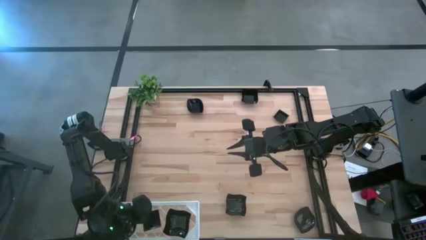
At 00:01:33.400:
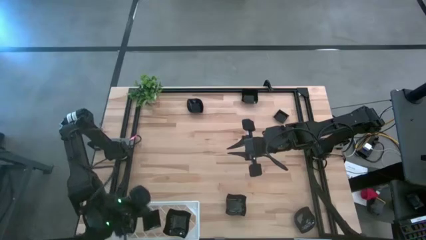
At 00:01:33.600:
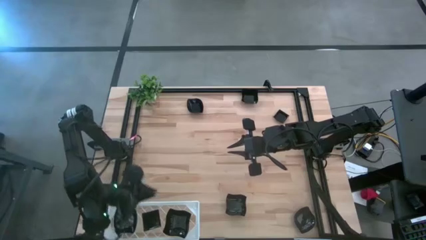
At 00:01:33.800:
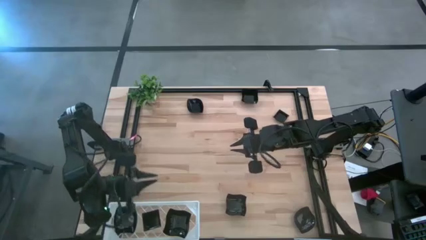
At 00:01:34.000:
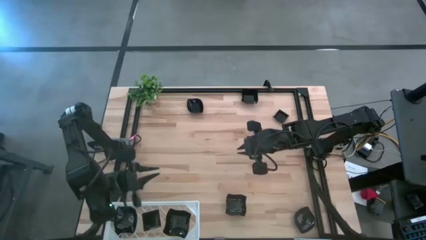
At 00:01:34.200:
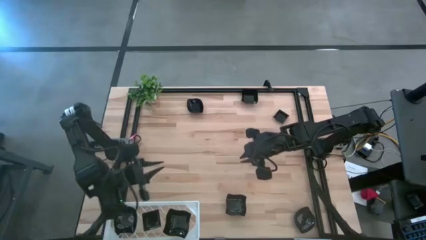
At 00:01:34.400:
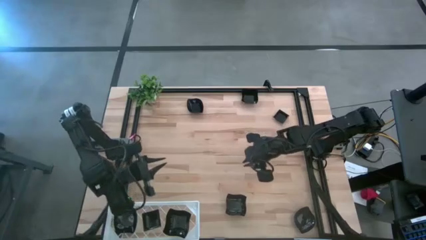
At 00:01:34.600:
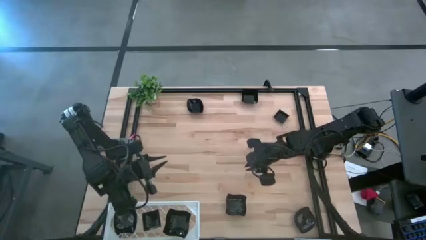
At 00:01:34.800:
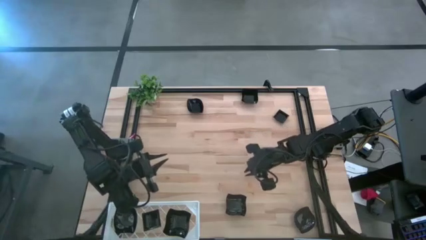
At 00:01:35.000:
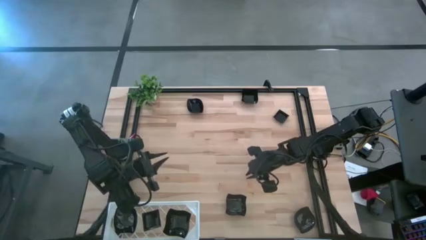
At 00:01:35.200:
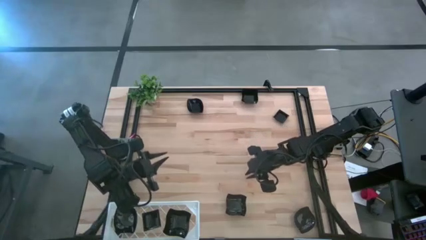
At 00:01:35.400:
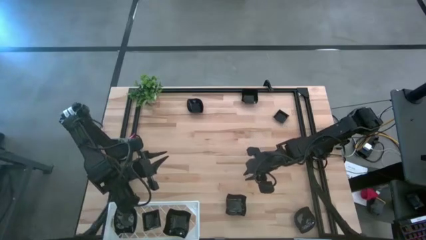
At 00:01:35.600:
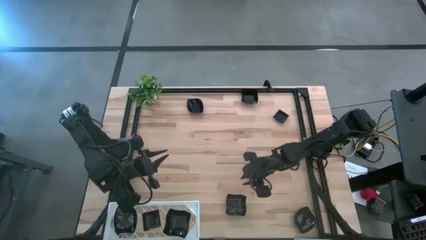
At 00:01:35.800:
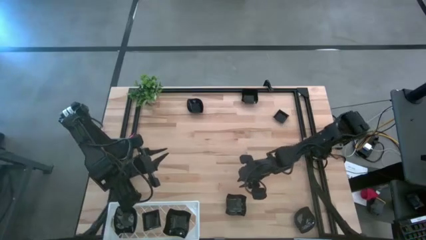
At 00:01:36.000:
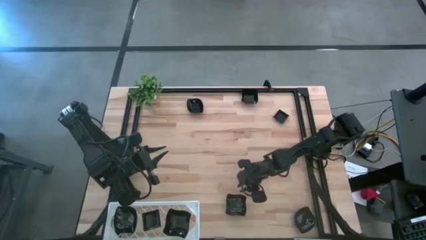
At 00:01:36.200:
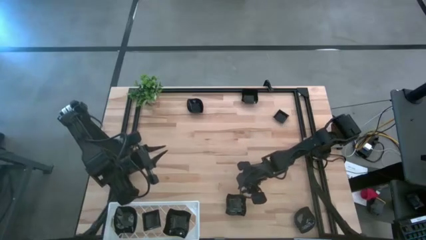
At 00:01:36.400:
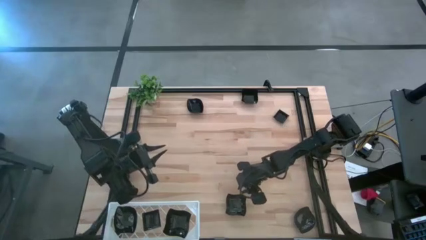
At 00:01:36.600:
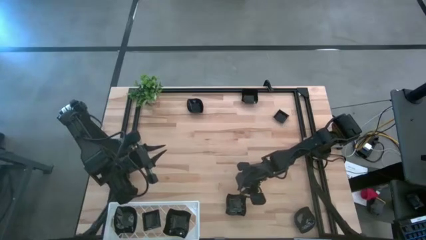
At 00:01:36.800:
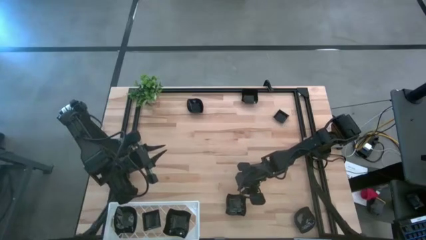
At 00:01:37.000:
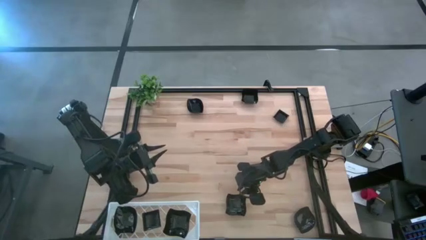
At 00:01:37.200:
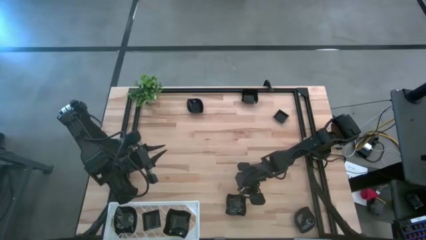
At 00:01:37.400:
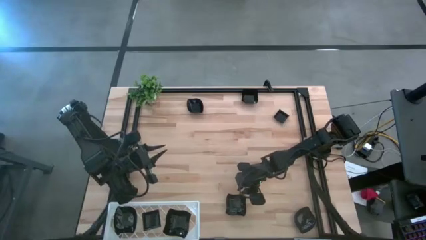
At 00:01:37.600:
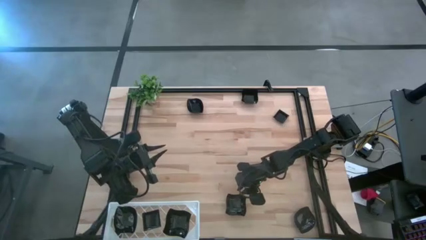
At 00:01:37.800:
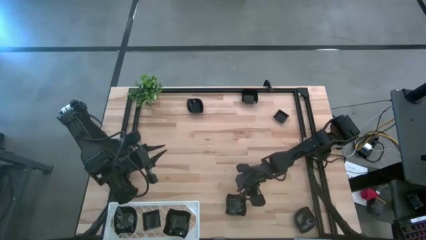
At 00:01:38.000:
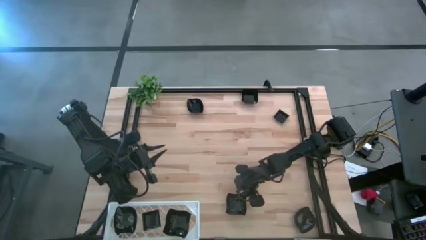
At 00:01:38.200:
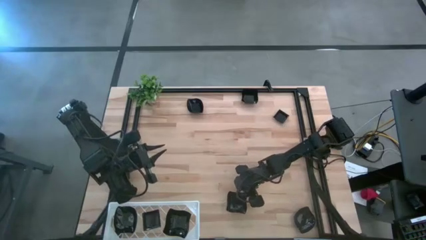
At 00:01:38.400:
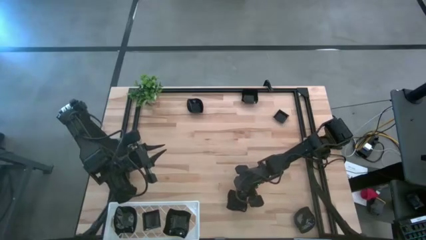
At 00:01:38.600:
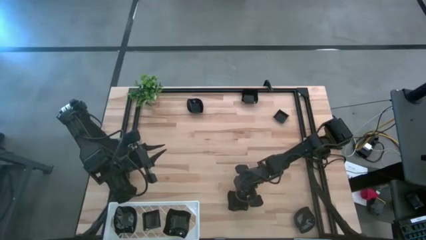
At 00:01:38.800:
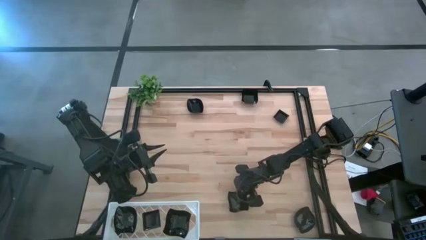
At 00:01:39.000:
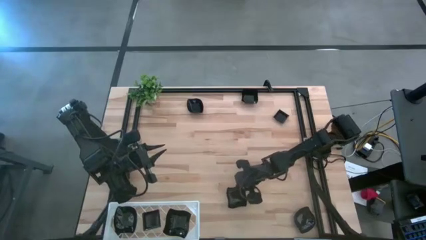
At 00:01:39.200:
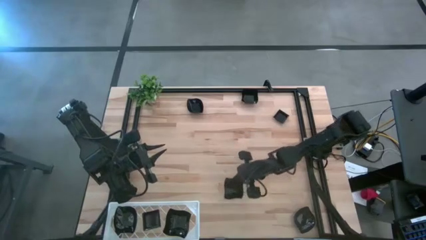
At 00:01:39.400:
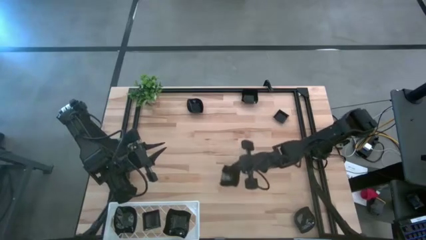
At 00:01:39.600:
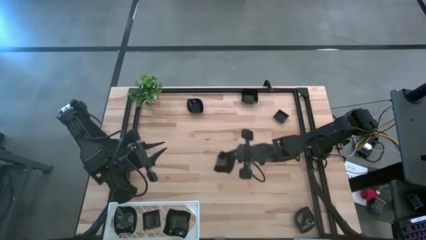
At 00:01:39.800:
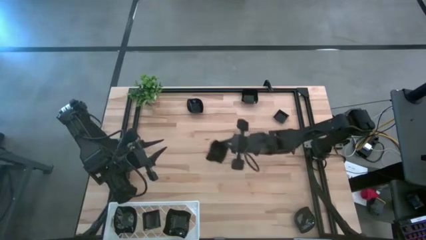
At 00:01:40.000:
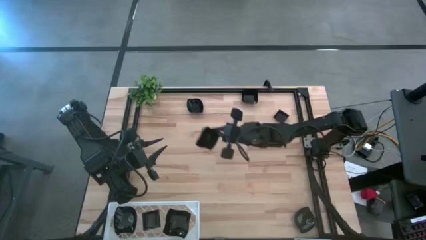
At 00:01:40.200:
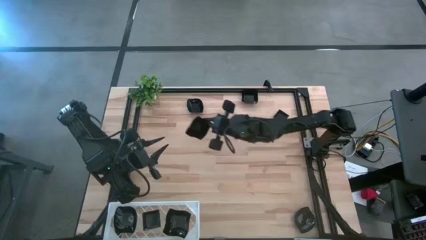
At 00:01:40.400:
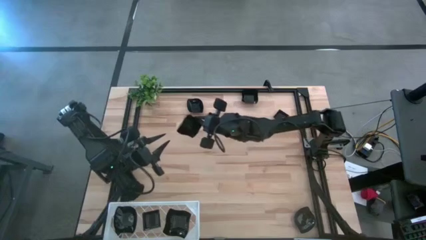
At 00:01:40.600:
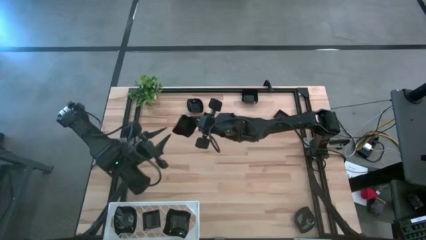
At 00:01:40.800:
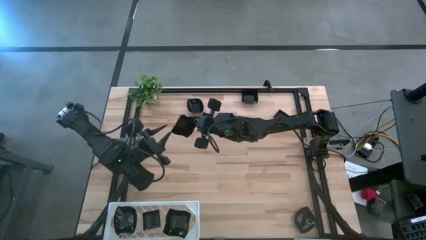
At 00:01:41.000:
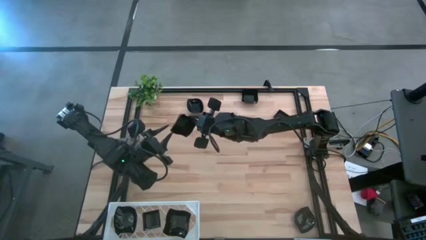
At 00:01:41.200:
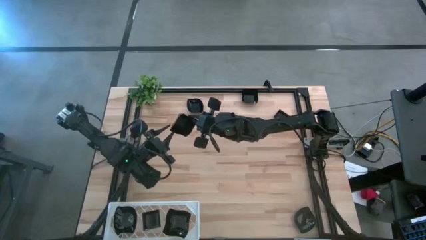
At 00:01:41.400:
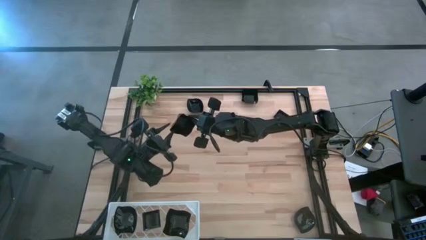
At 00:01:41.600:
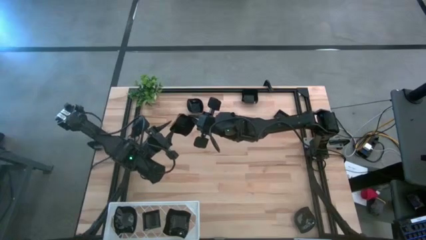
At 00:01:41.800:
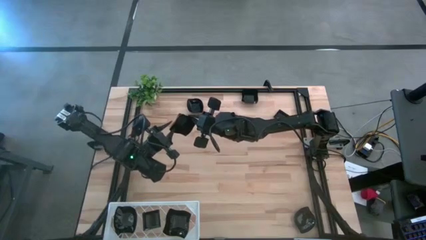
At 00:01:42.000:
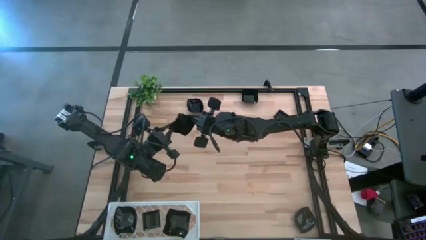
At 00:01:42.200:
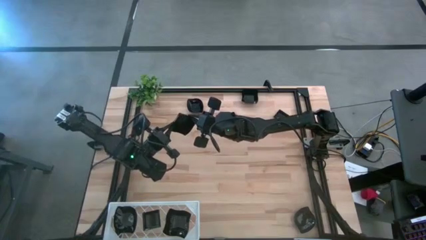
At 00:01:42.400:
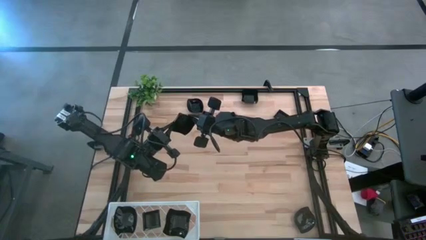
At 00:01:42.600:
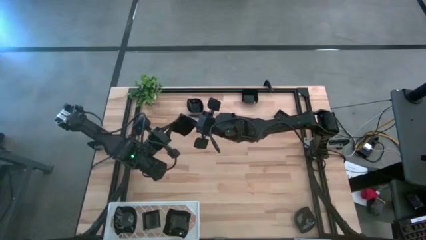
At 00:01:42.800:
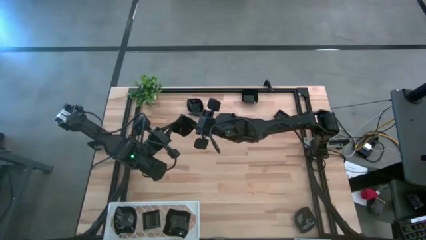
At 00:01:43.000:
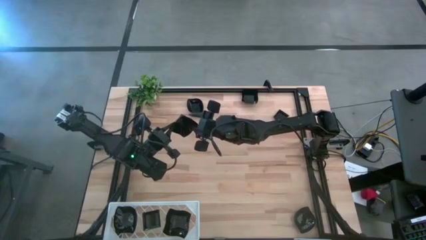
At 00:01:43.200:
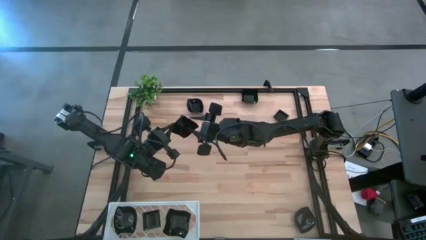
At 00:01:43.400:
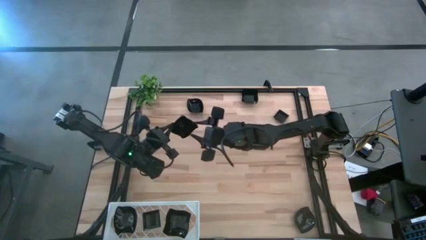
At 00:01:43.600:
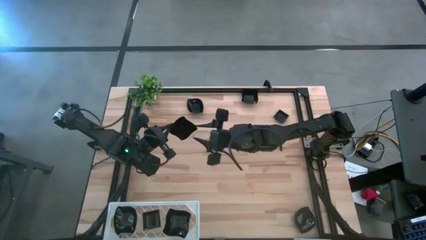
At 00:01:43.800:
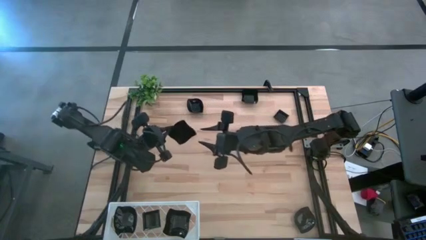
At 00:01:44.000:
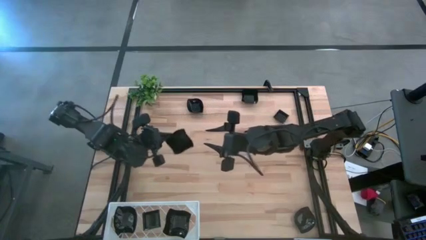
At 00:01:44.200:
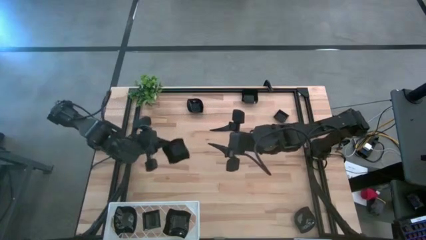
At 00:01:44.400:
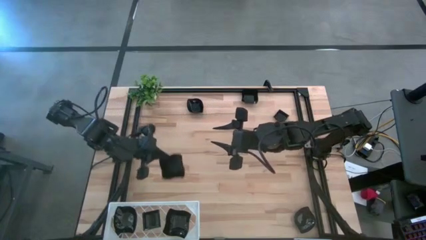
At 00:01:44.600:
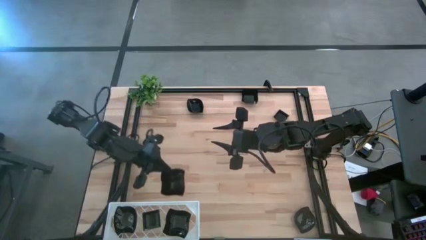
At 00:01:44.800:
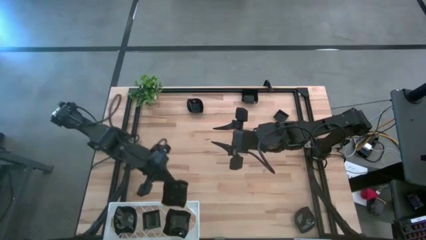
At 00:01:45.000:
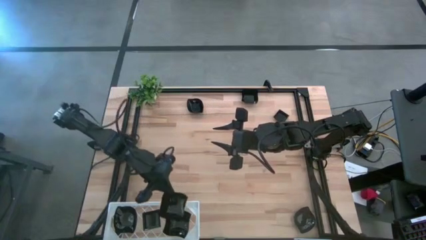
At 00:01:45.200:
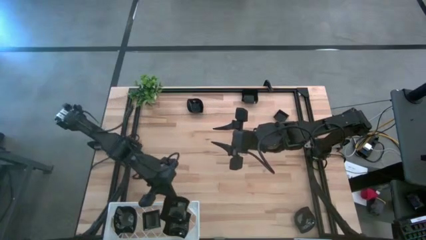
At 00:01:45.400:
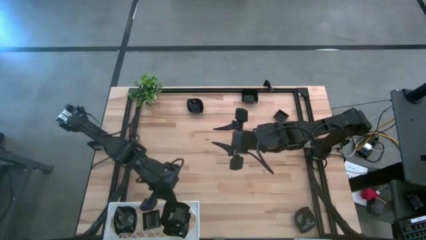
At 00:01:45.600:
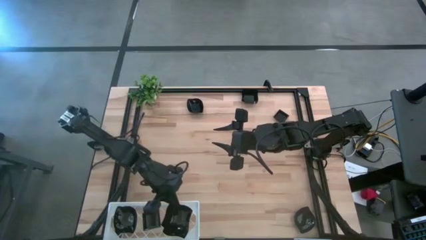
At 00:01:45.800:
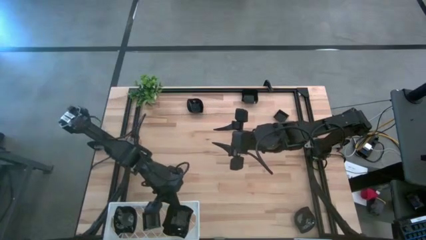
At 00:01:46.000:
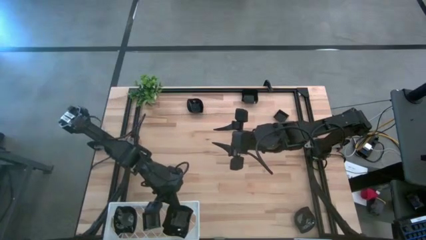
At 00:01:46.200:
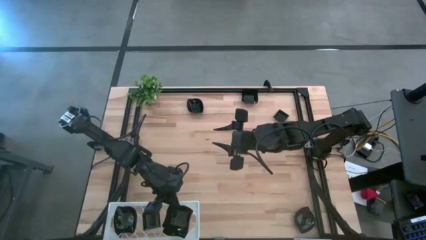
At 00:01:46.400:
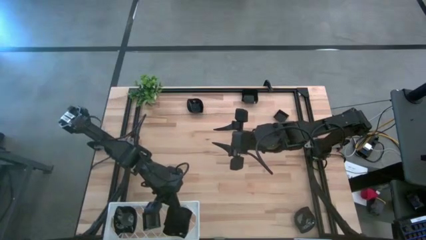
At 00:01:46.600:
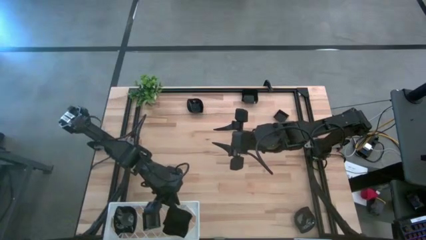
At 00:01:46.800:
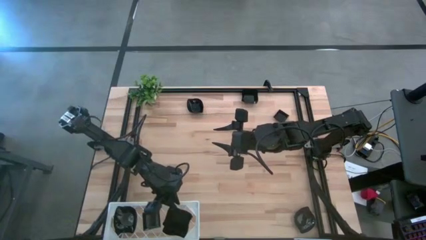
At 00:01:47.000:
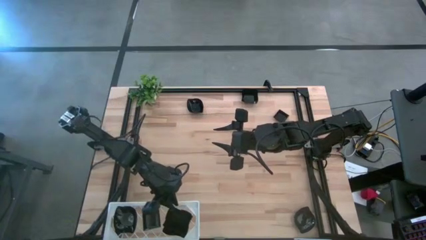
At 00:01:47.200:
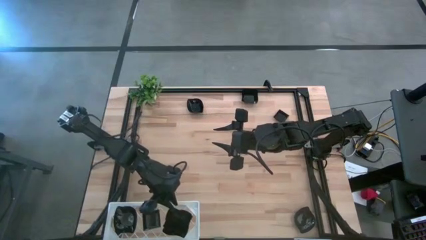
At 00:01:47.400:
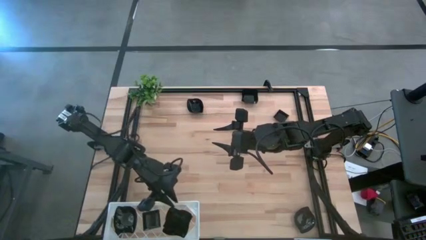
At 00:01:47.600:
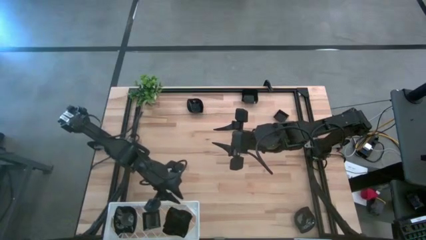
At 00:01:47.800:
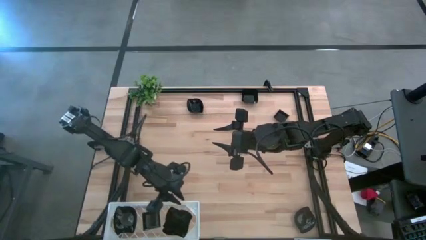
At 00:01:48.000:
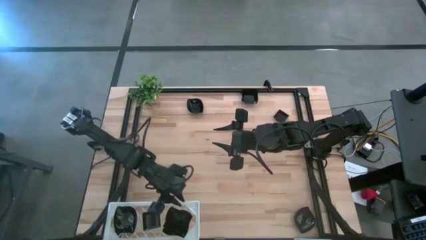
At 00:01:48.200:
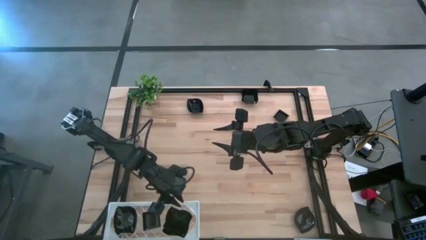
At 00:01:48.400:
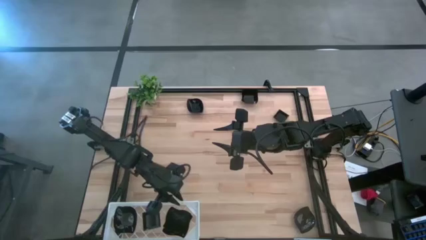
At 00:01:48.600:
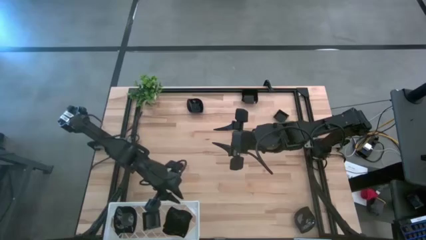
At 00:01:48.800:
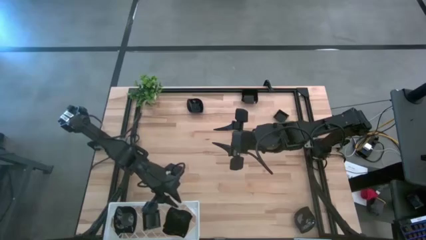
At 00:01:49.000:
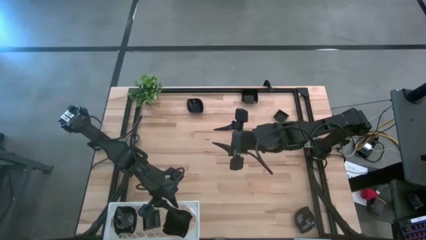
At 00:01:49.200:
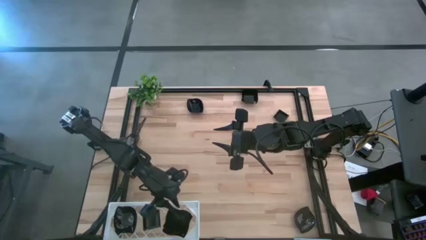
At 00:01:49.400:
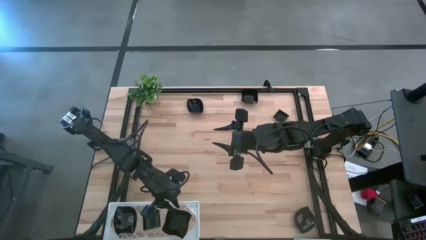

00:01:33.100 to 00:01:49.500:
Task: Pick & Place Mini shaped plates
Stack the black distorted square plate on top of the other black distorted square plates on the shelf
